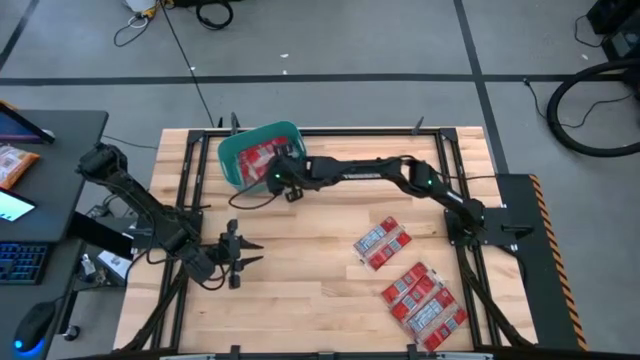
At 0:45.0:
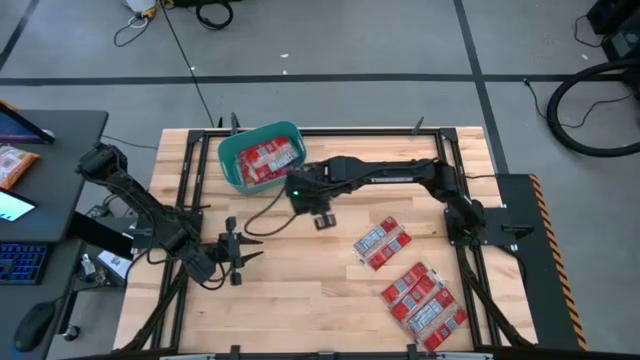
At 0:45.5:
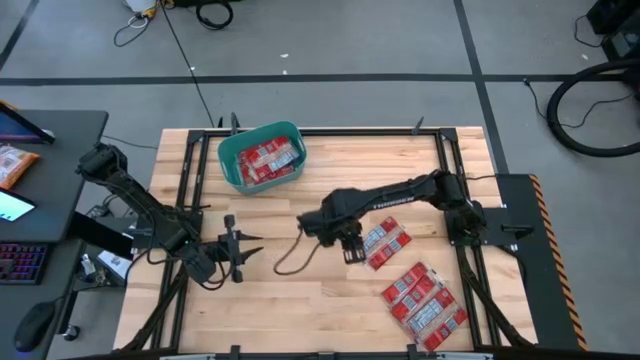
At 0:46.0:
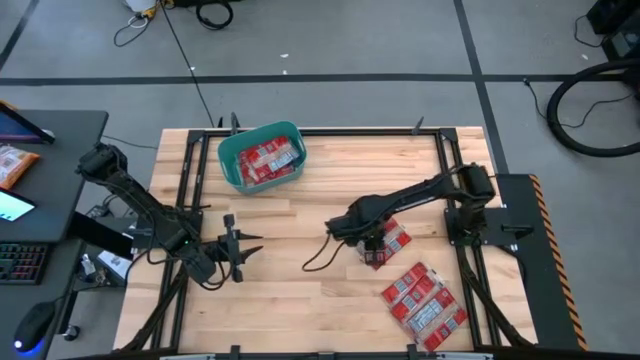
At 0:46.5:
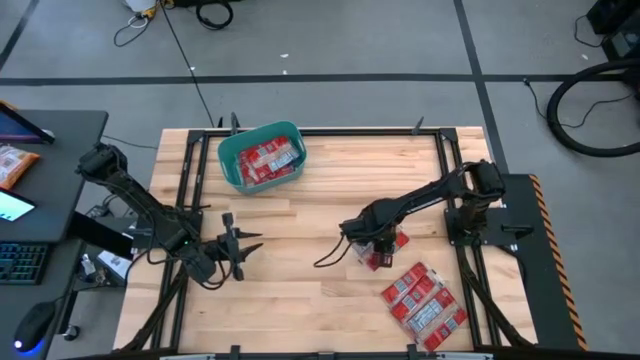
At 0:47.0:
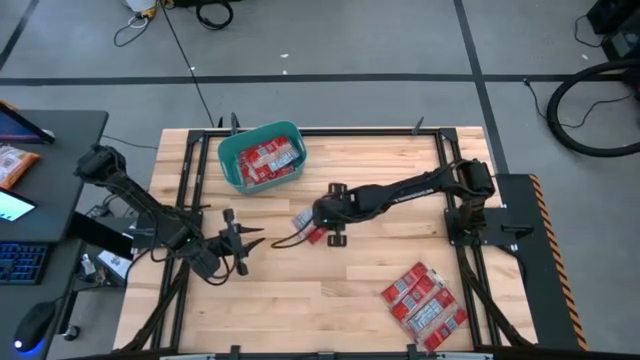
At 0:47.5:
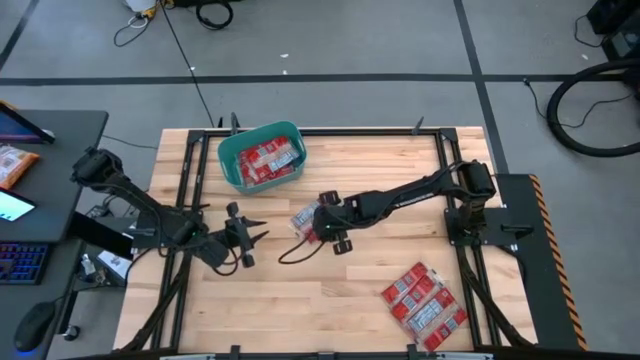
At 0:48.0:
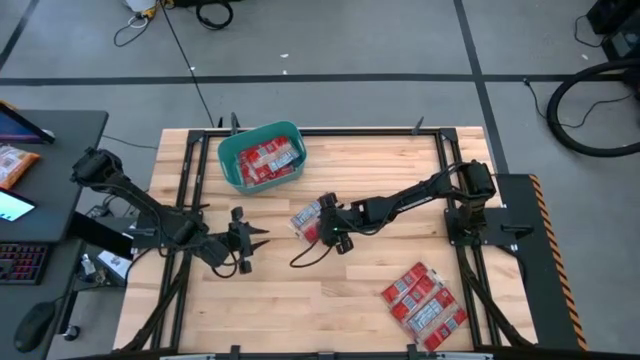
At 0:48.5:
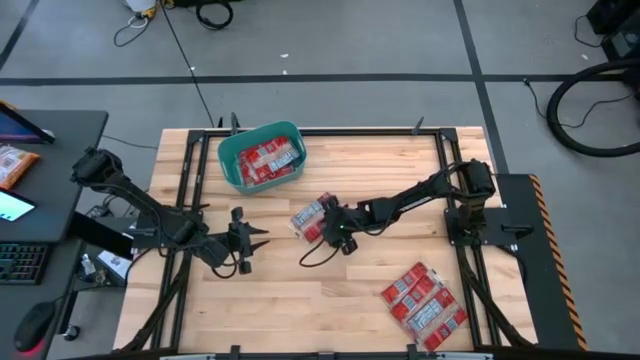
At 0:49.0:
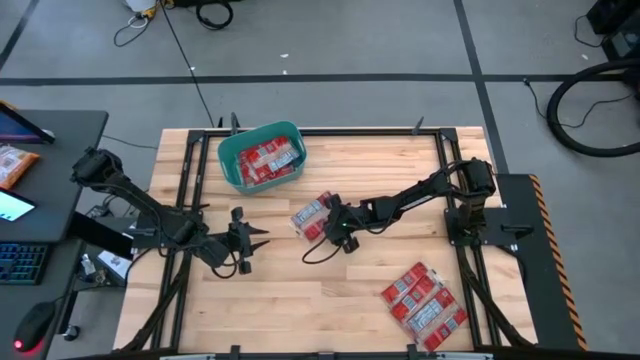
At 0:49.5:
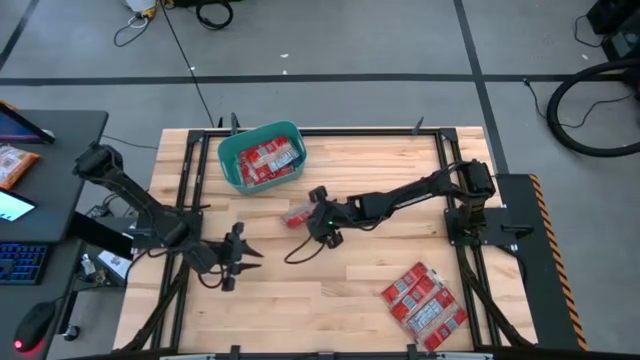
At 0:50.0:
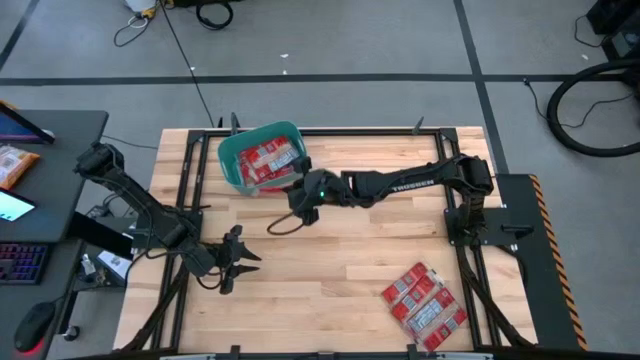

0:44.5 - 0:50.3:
Task: Sort popcorn bags into baskets
Put the popcorn bag into the green bin

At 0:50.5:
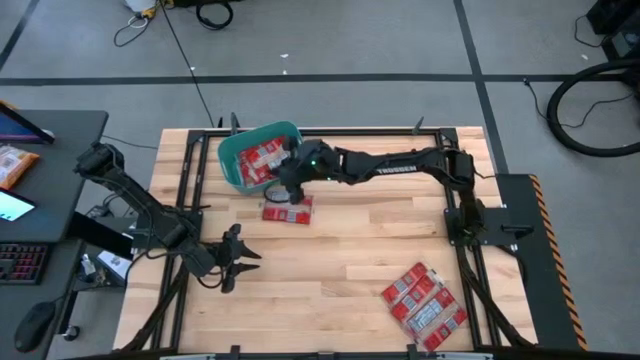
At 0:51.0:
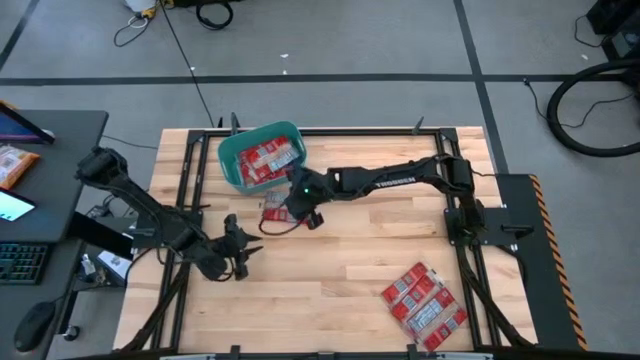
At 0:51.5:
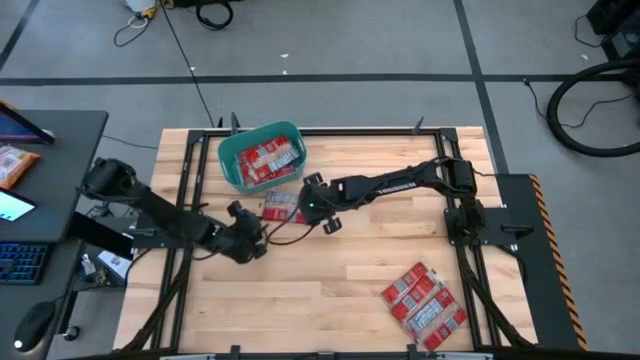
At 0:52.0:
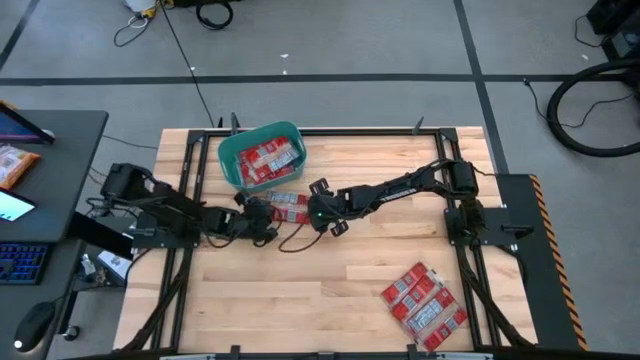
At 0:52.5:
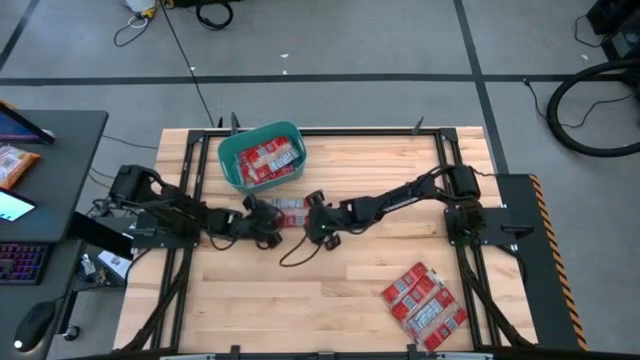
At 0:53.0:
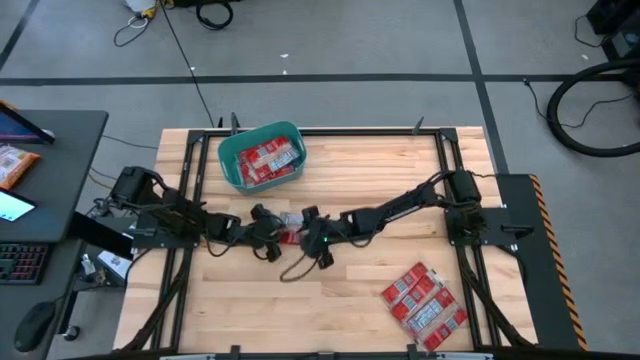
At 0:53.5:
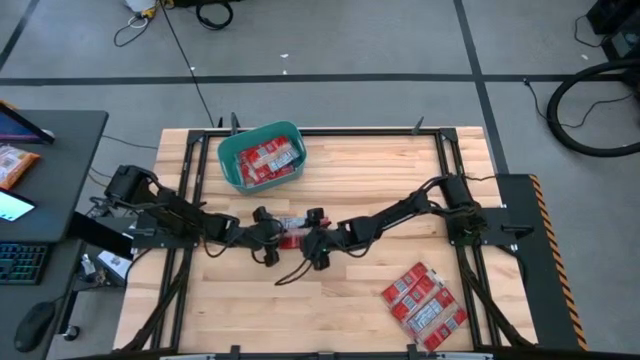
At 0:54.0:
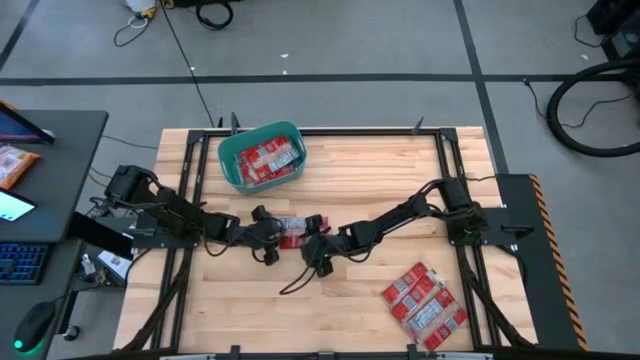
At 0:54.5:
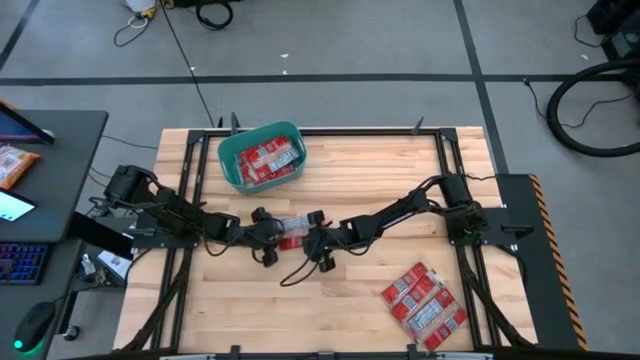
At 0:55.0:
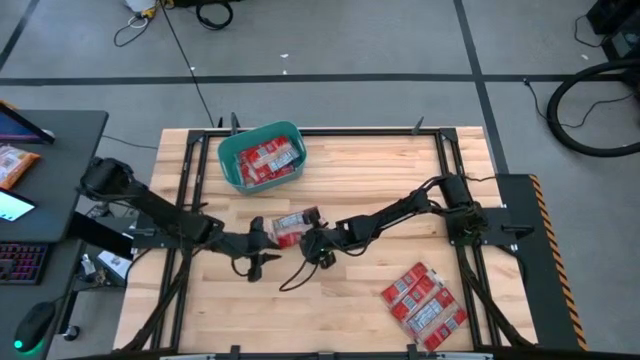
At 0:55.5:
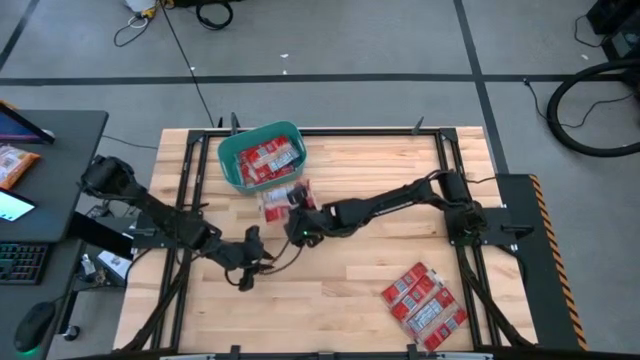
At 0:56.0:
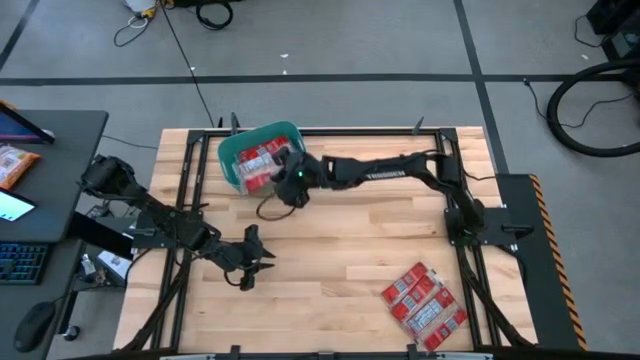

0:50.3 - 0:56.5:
Put the popcorn bag into the green bin

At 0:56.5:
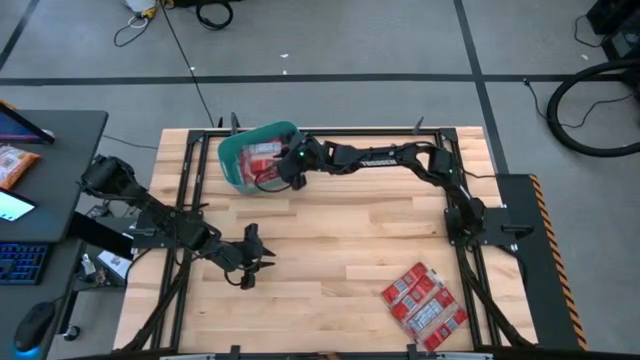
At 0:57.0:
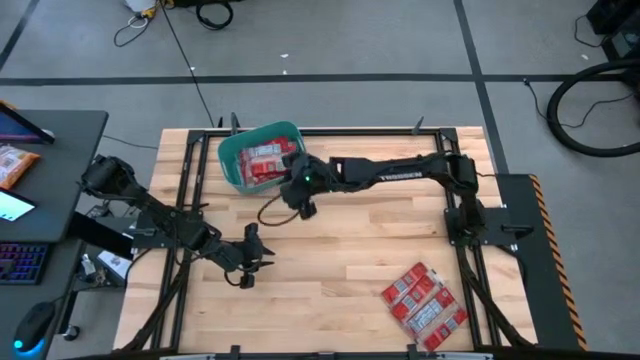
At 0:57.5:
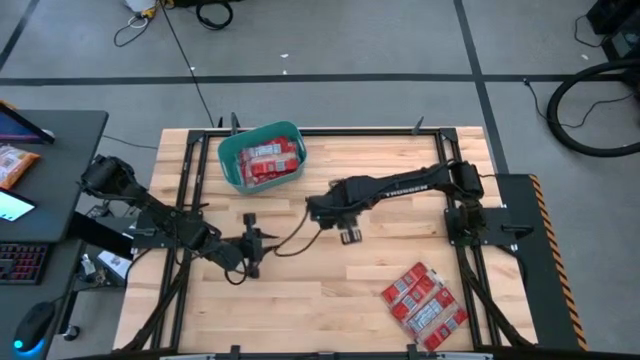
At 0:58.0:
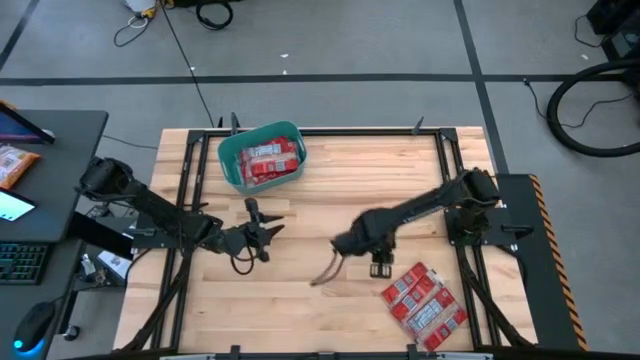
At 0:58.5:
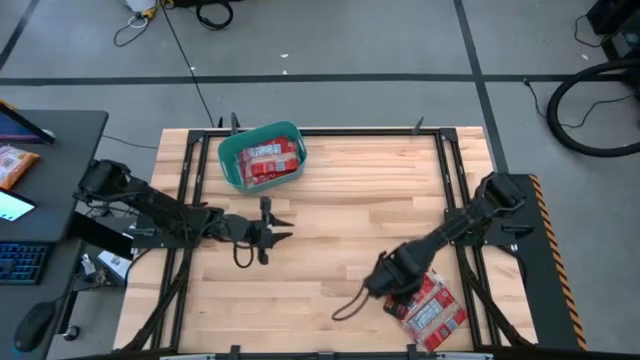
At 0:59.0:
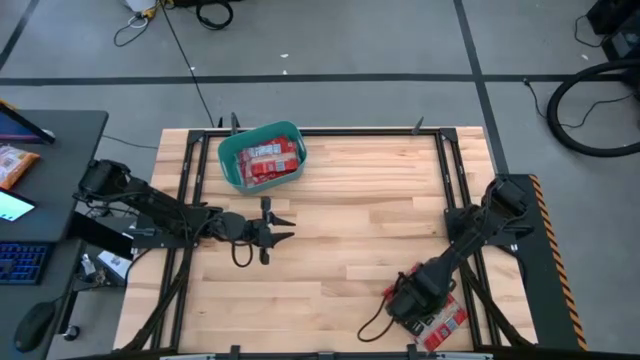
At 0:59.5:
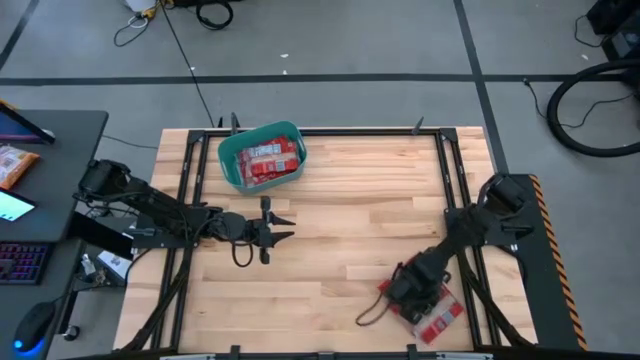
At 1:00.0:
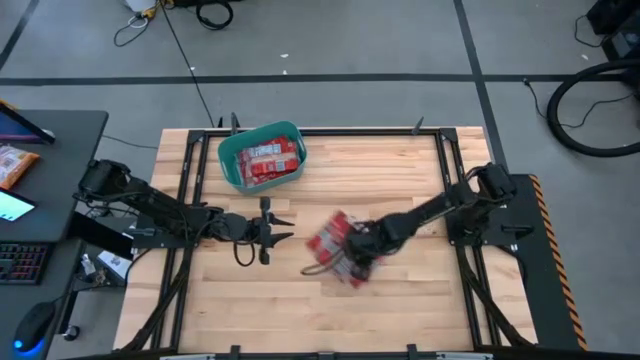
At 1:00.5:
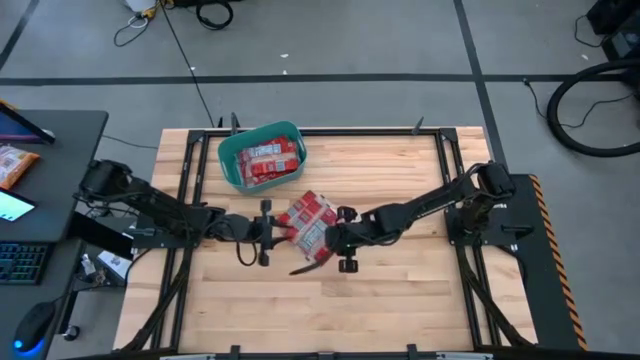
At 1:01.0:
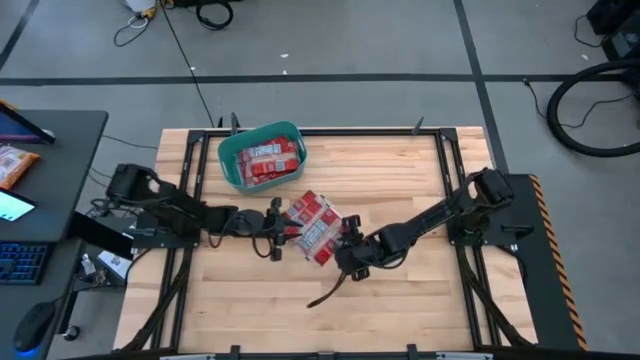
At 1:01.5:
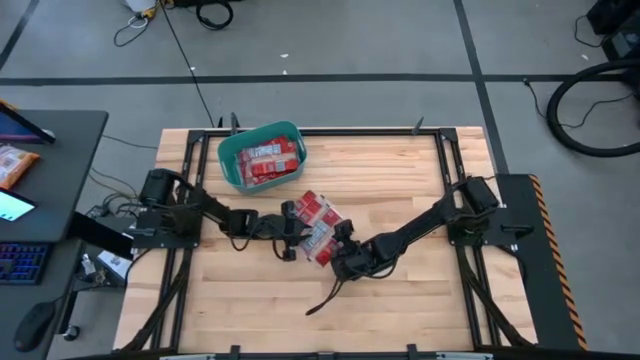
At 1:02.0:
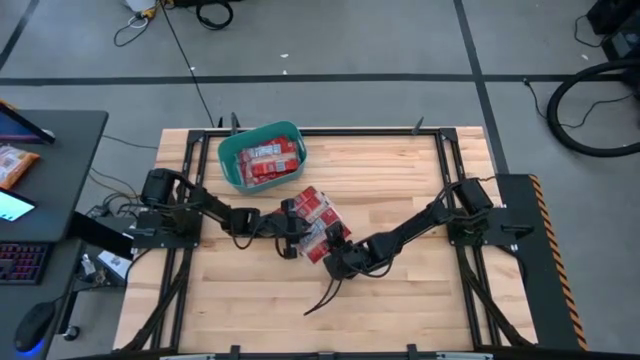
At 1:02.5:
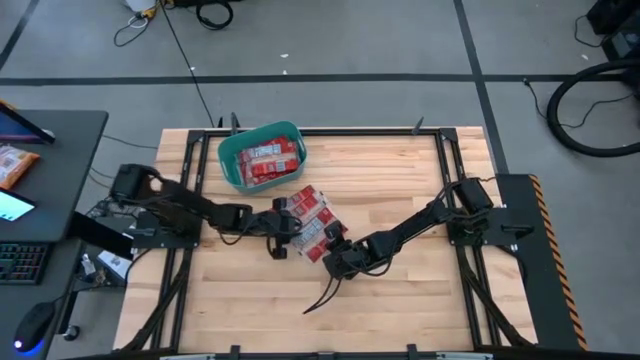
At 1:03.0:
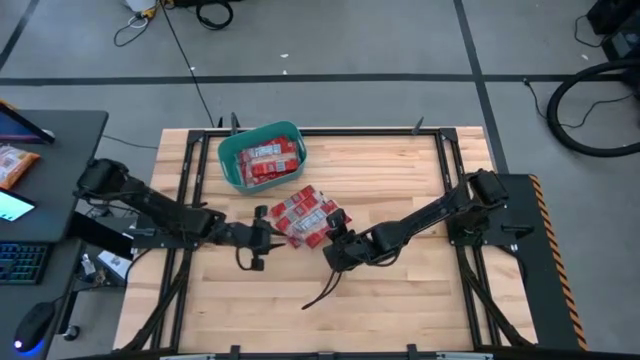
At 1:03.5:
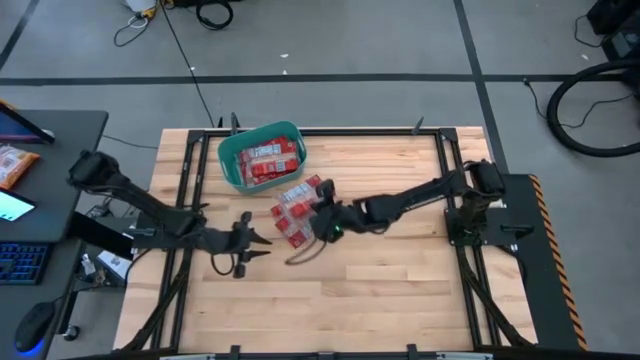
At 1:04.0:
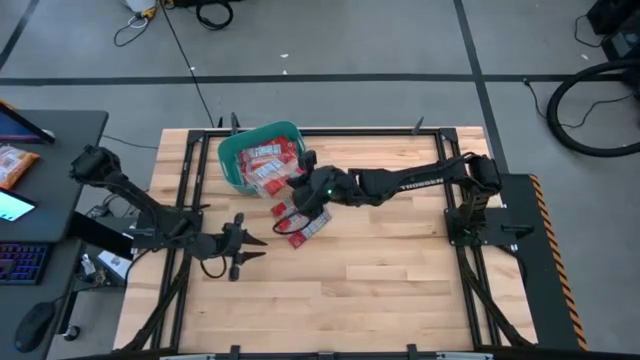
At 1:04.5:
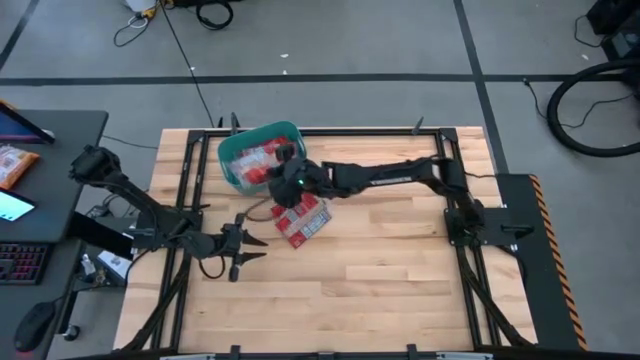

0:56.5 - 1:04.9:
Put the popcorn bag into the green bin

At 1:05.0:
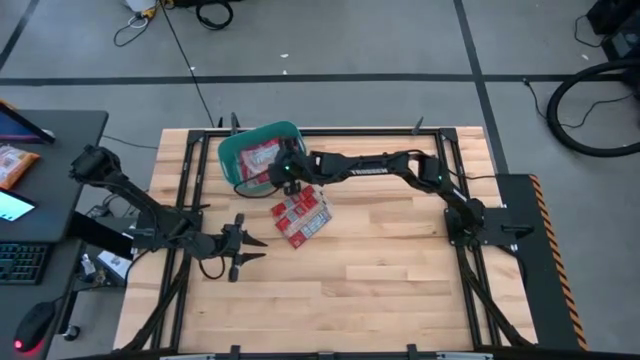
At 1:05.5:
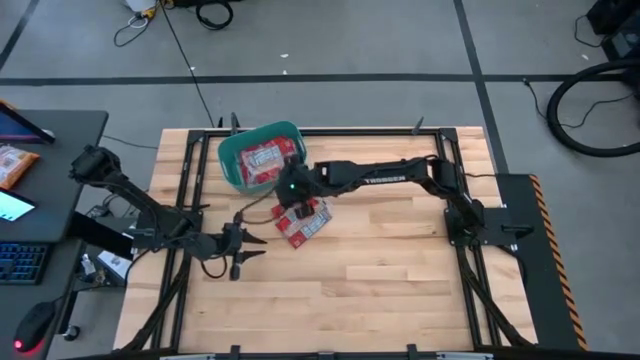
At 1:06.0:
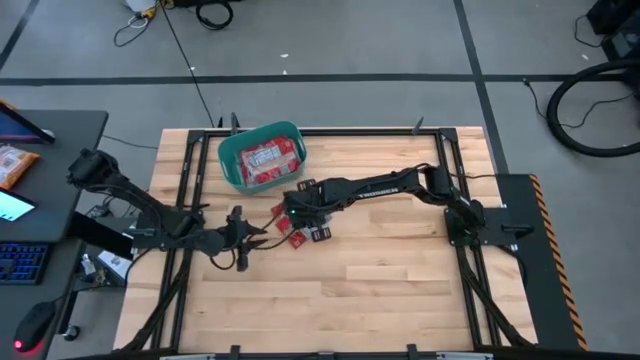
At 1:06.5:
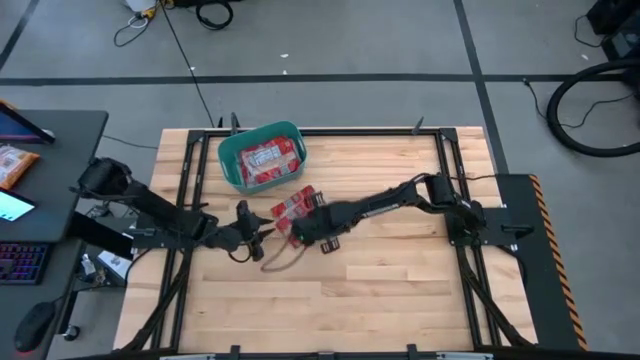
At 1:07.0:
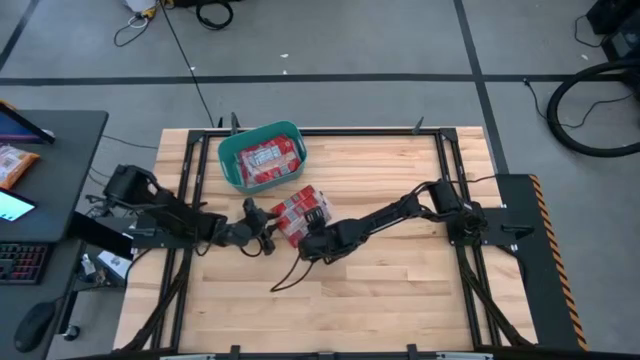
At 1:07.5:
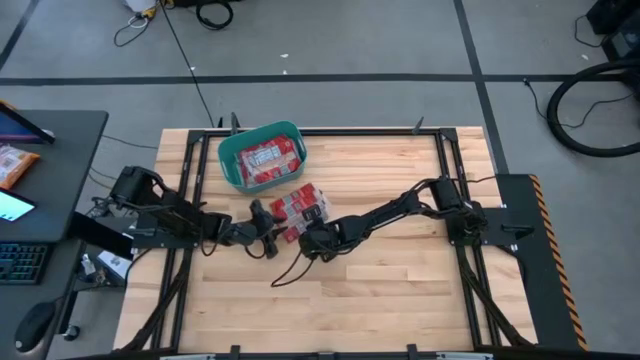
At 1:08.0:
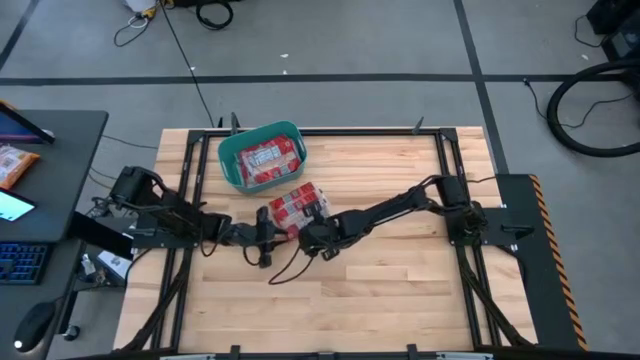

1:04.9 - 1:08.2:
Put the popcorn bag into the green bin
